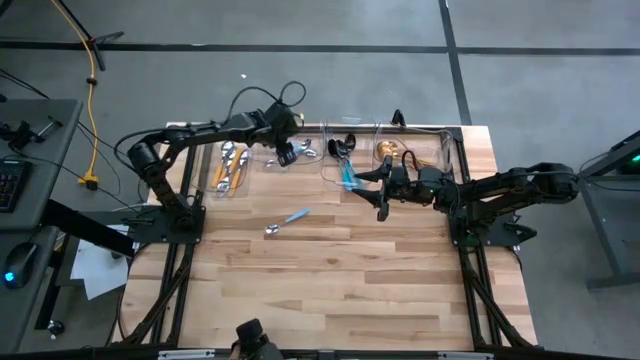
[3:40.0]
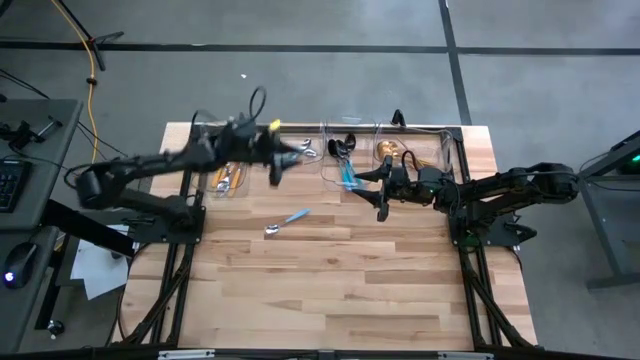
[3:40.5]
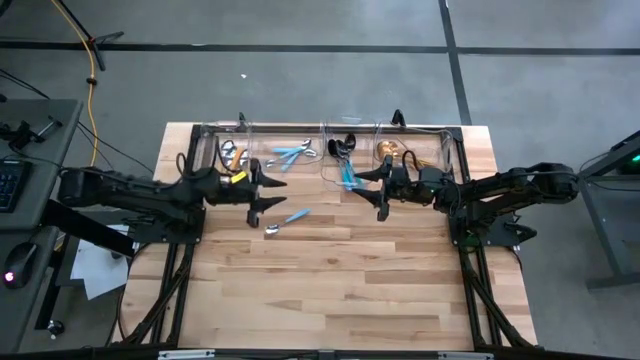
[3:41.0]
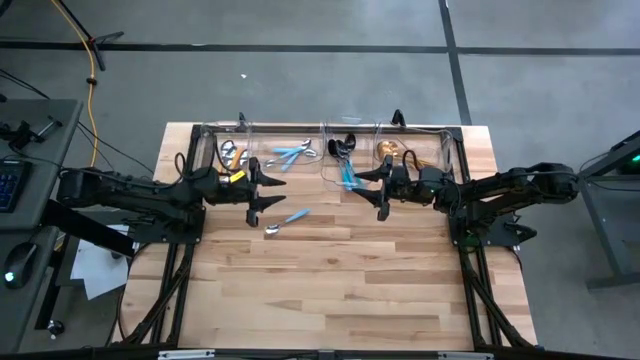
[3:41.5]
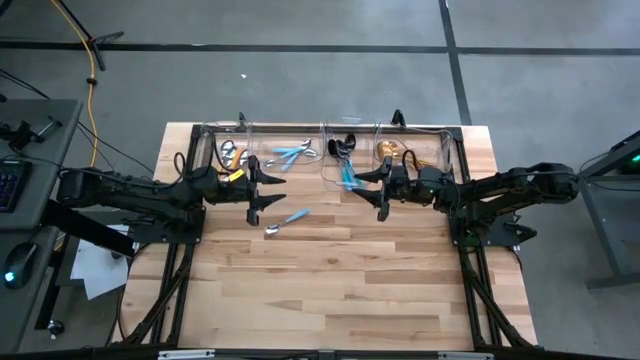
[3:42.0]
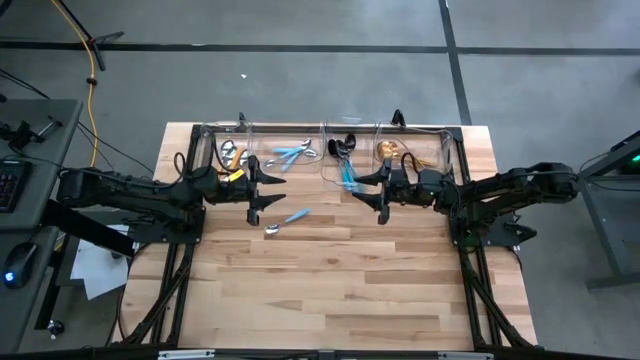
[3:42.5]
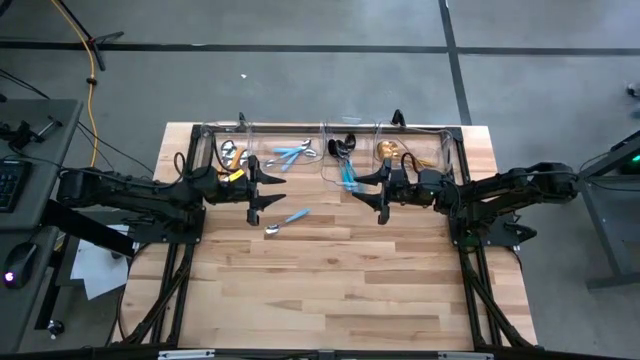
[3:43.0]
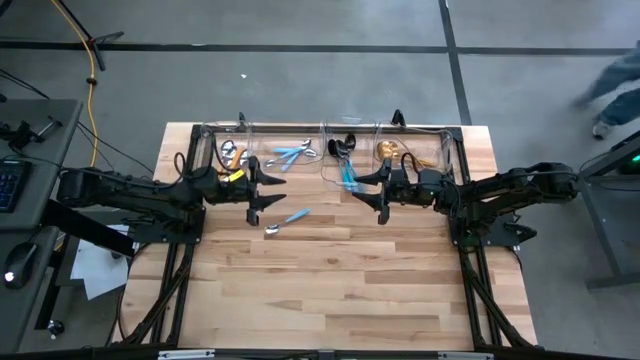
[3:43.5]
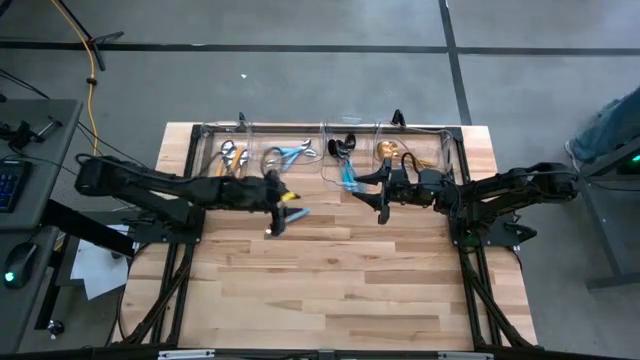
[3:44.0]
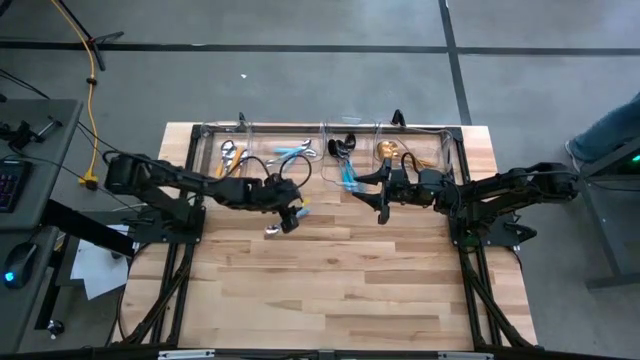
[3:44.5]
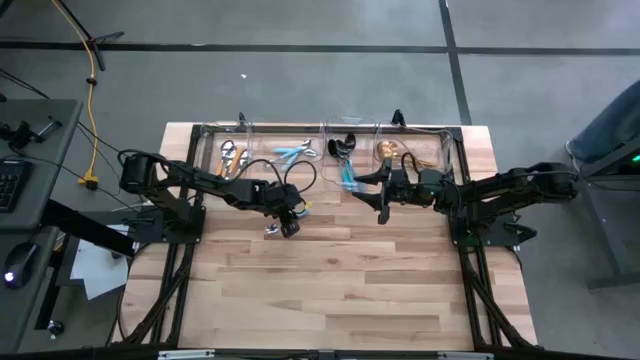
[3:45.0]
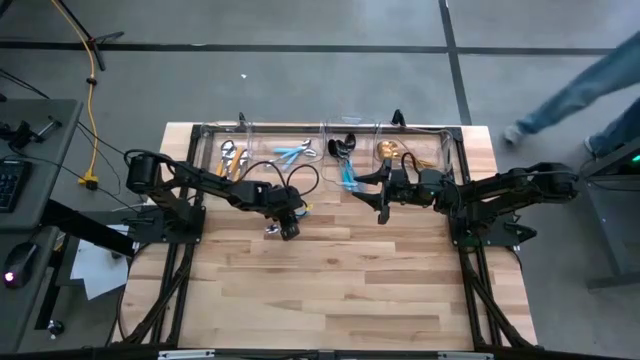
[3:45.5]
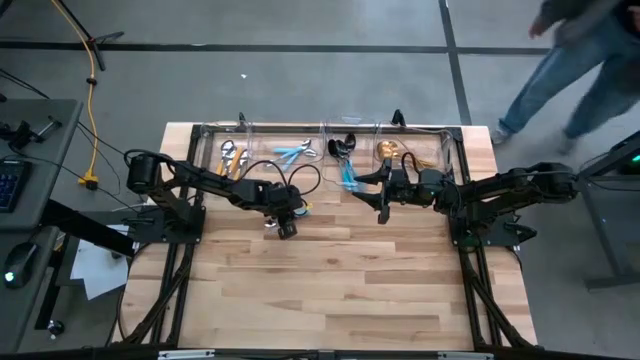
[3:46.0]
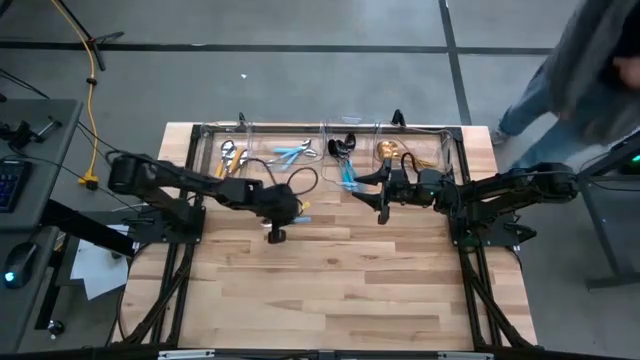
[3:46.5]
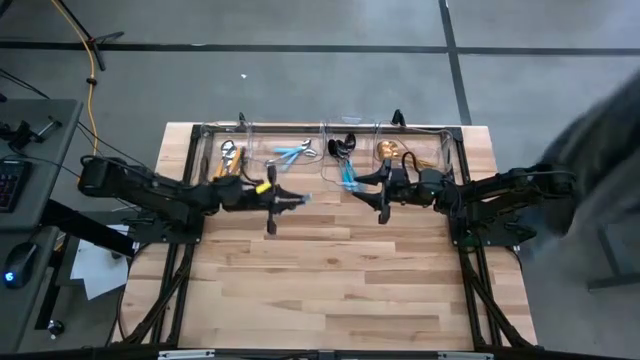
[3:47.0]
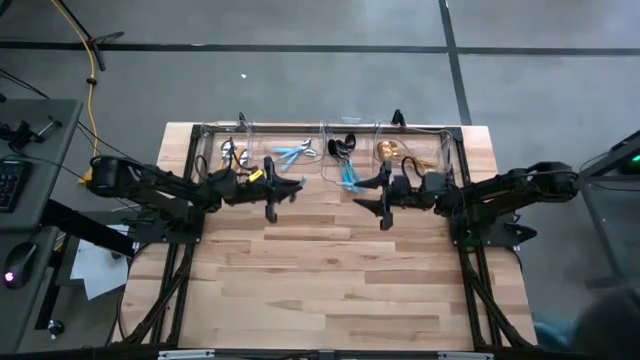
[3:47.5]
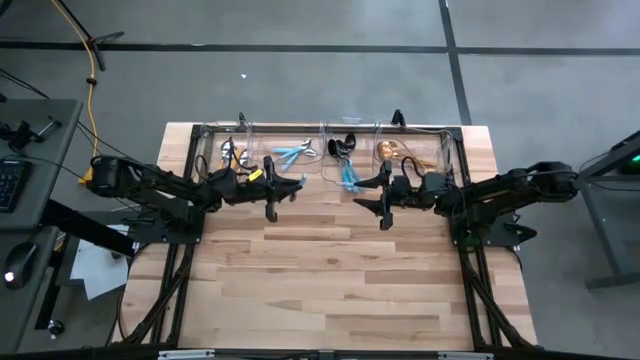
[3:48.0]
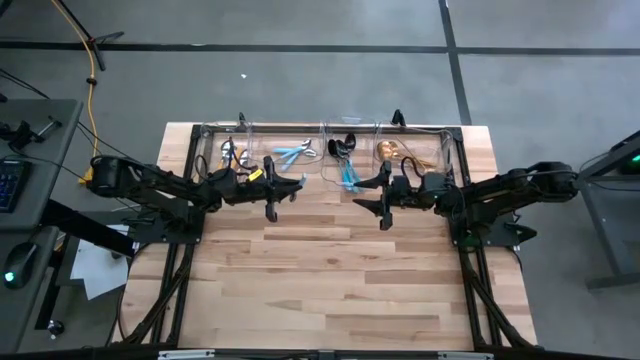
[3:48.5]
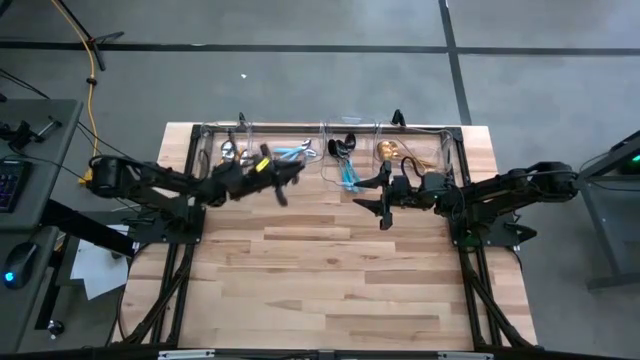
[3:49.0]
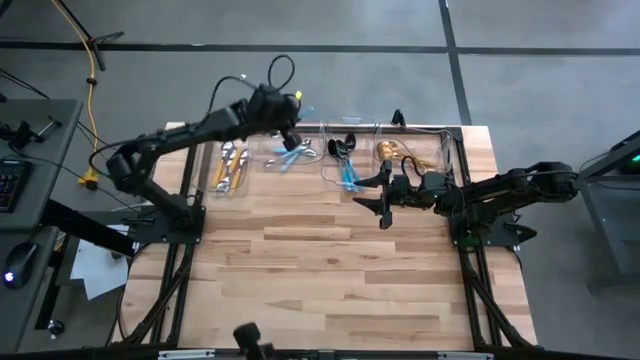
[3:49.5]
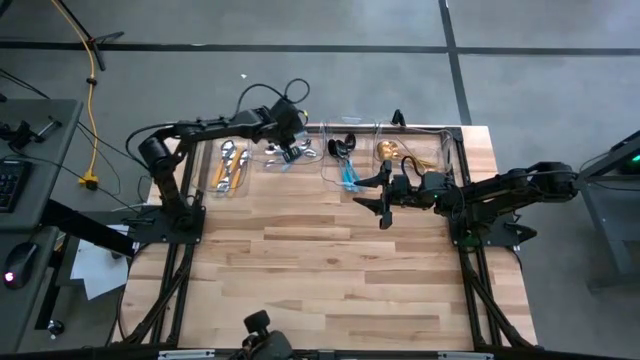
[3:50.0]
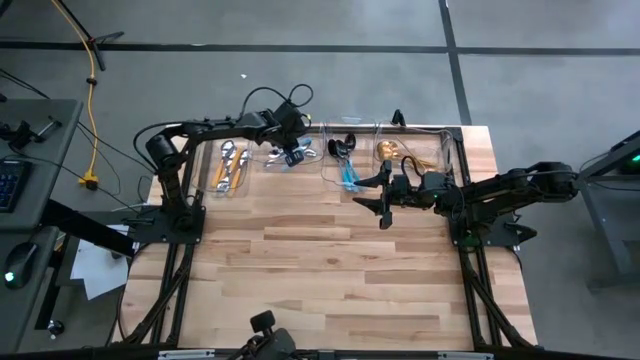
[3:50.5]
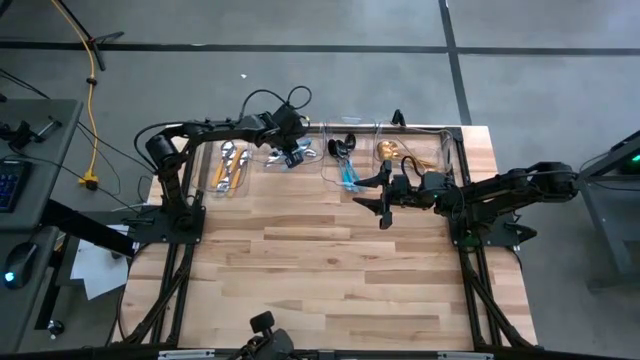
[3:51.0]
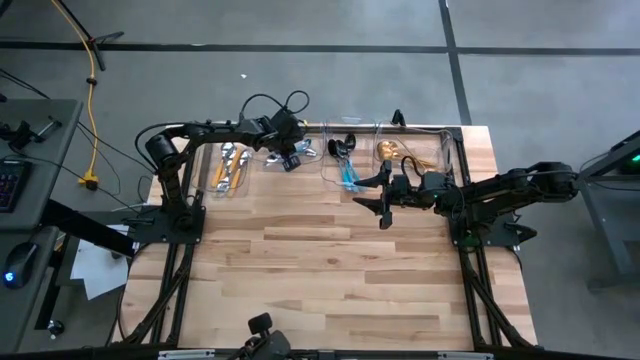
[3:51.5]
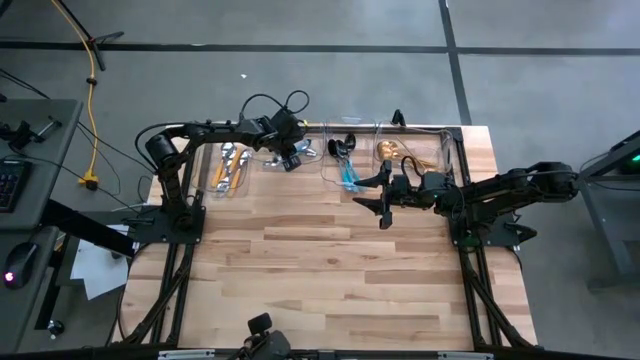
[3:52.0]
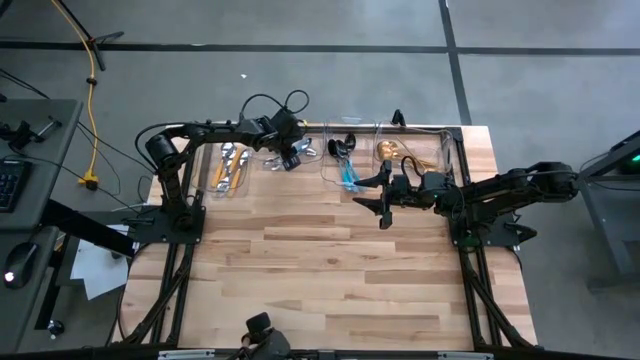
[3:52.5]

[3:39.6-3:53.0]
Task: Sort silverware by color (type)
Put the blue spoon into the left transparent bin

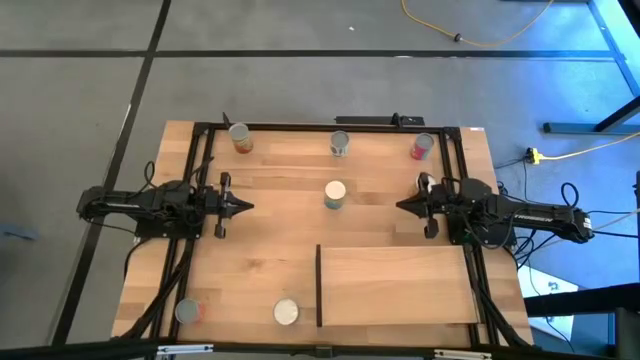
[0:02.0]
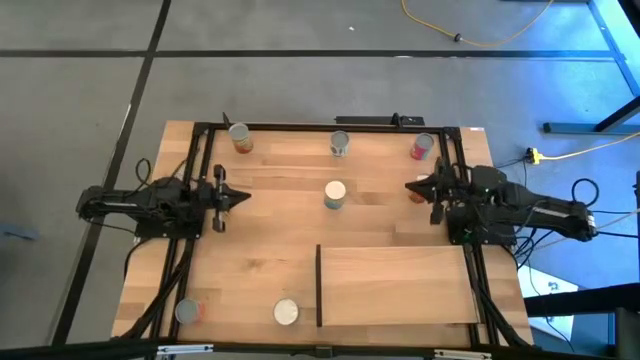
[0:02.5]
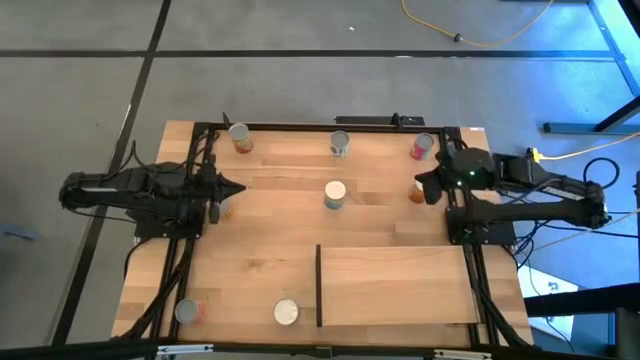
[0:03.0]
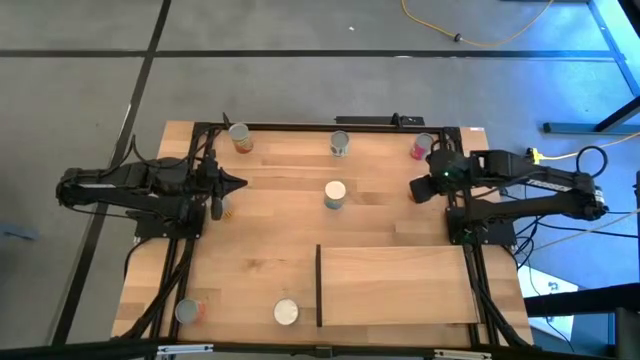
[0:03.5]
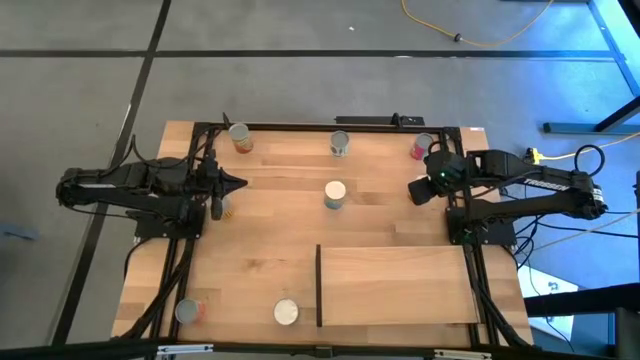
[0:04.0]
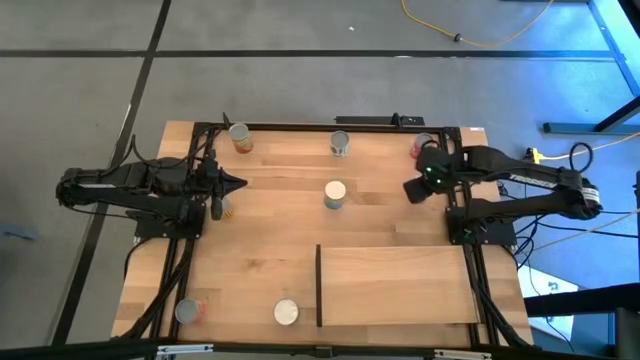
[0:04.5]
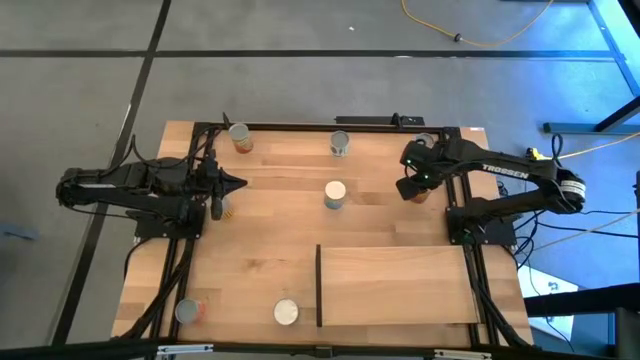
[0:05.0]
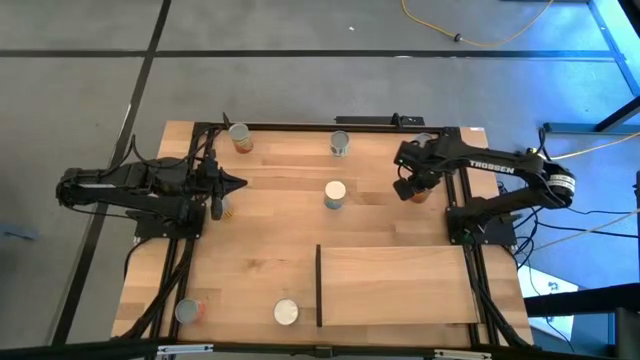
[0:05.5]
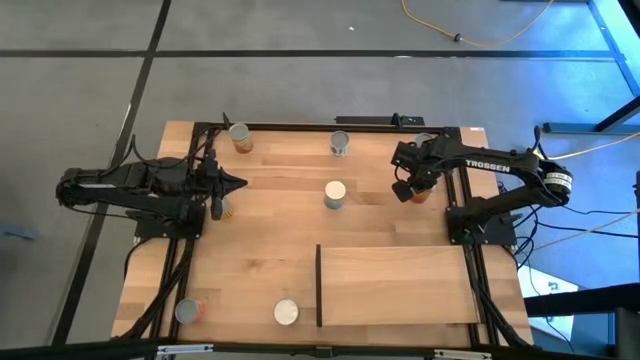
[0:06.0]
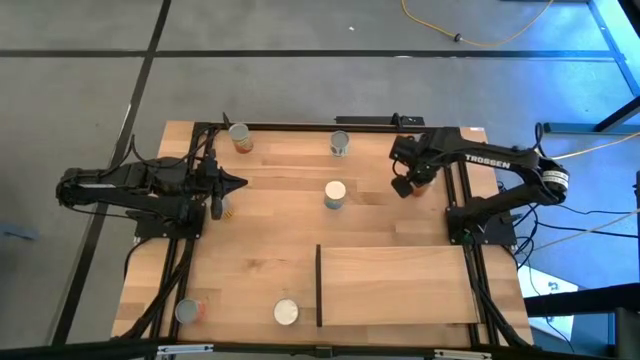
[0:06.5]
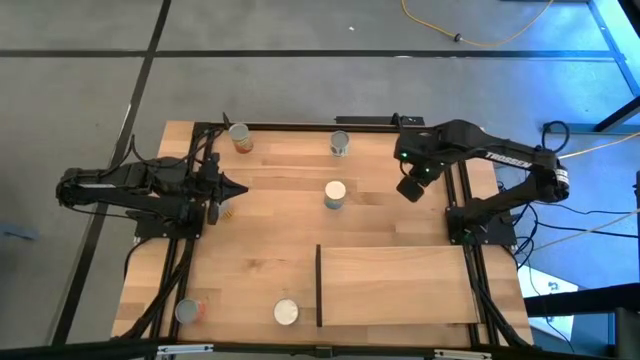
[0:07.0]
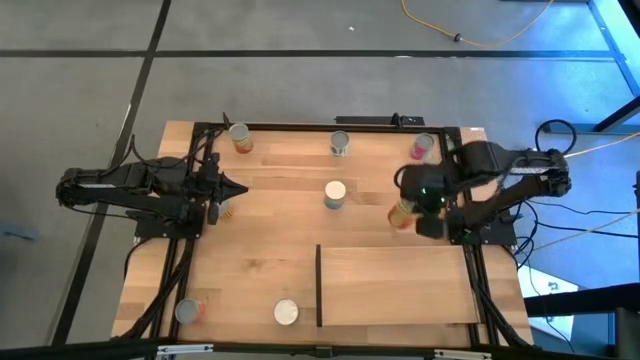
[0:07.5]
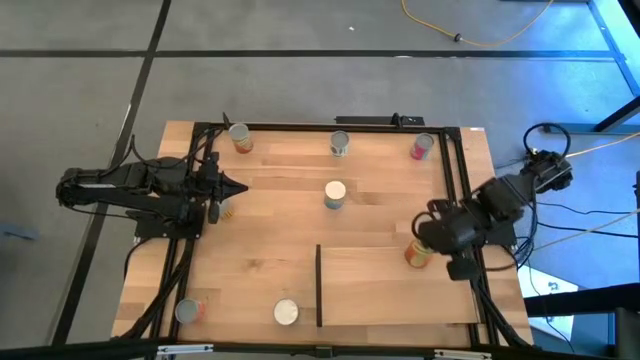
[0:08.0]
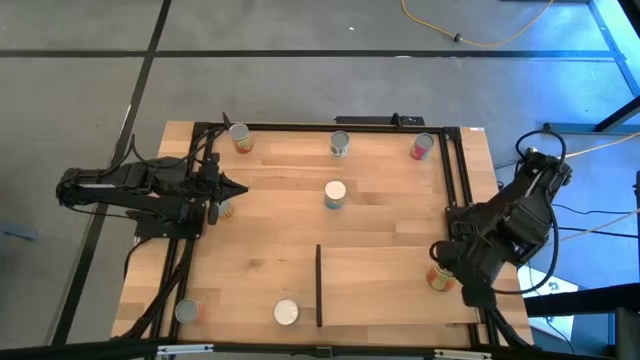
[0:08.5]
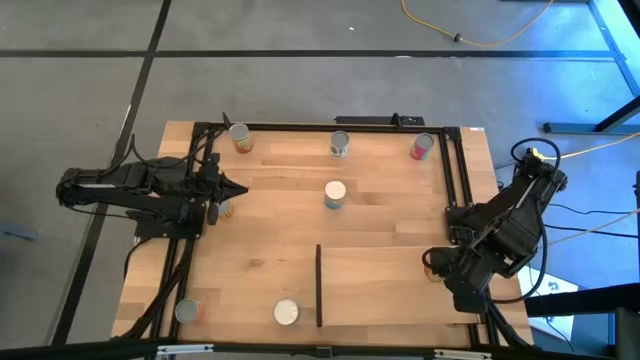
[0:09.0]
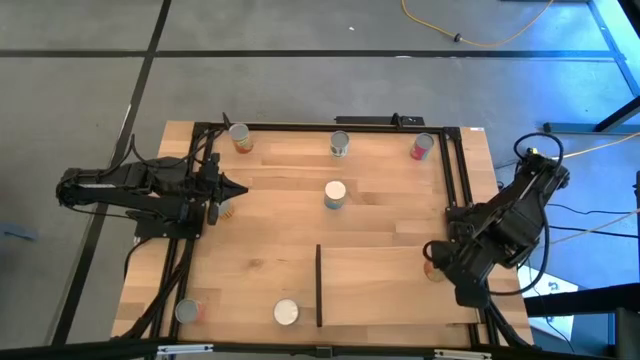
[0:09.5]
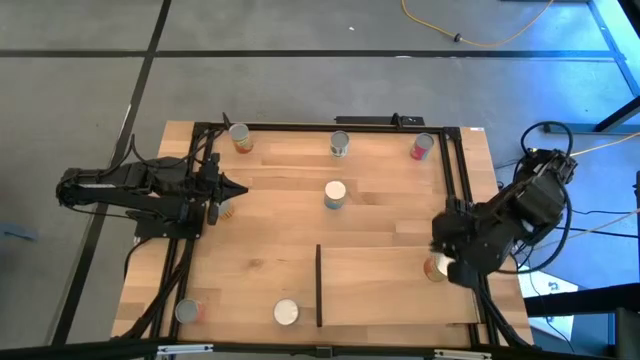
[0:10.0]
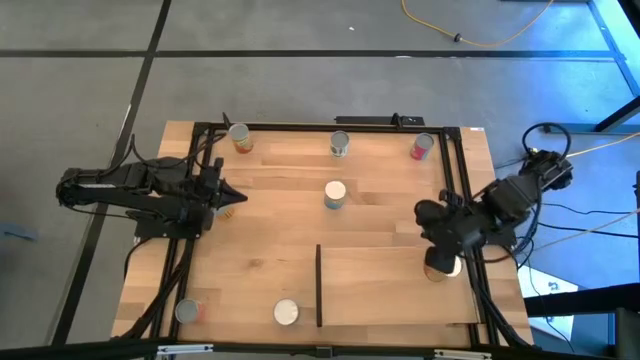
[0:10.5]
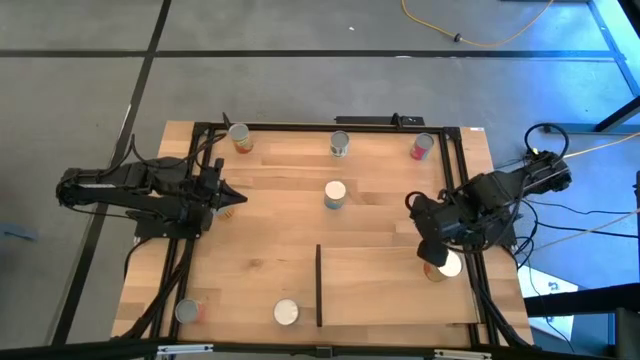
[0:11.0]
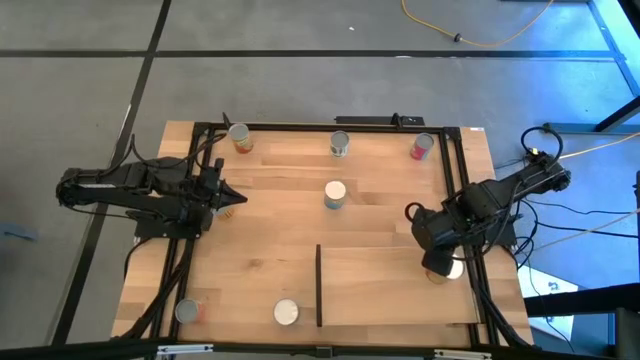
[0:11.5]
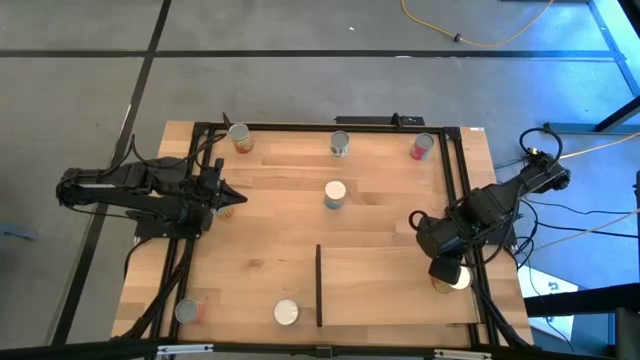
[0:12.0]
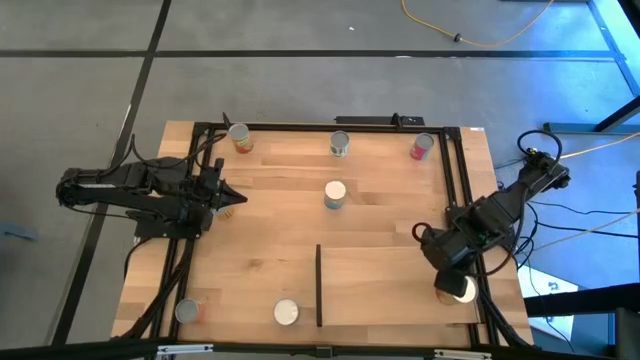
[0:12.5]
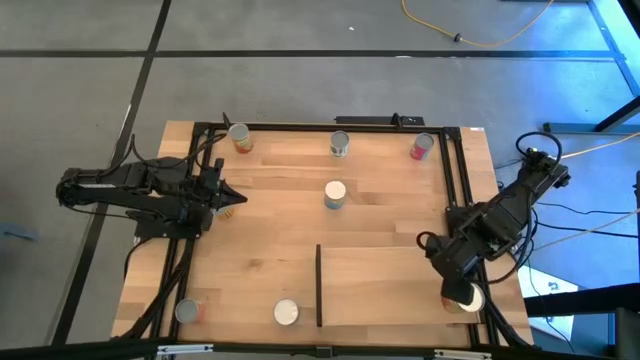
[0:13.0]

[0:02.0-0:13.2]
Task: Pick and place cans onto a shelf
Put the canned pineapple on the shelf
